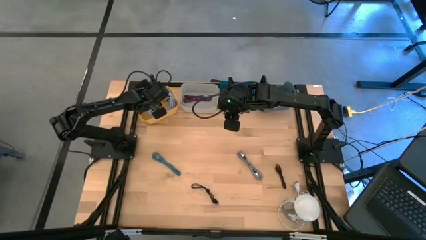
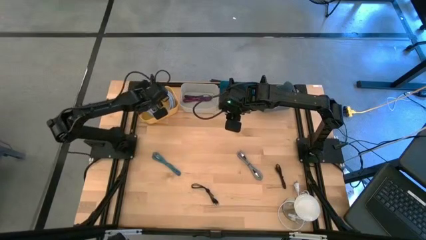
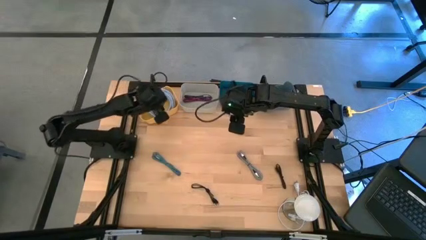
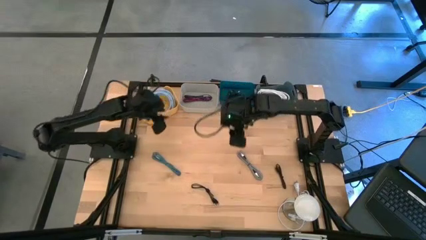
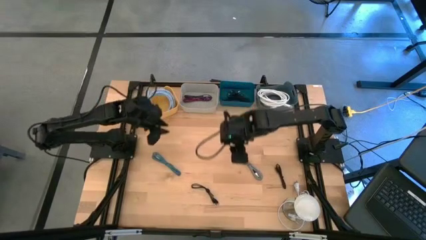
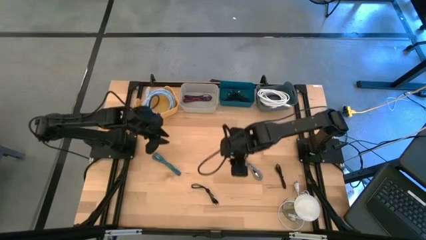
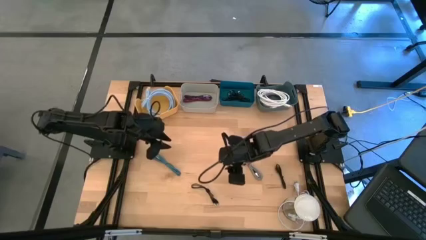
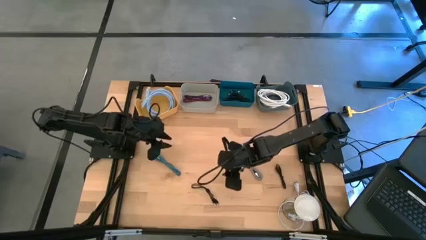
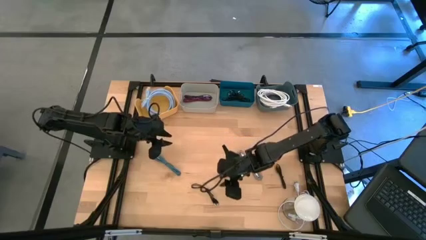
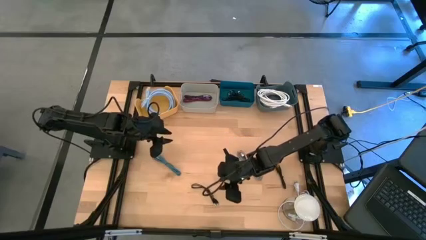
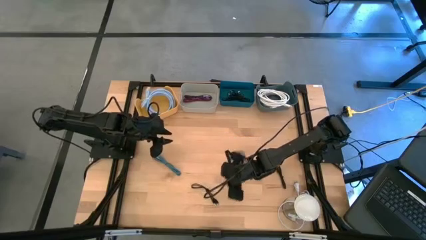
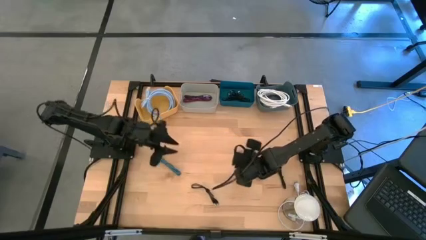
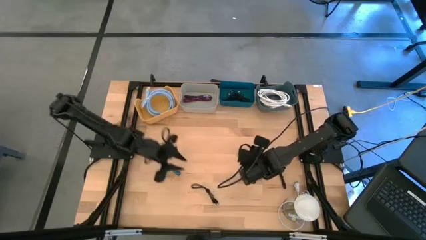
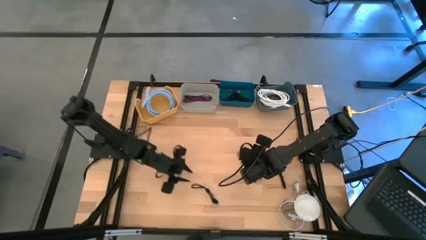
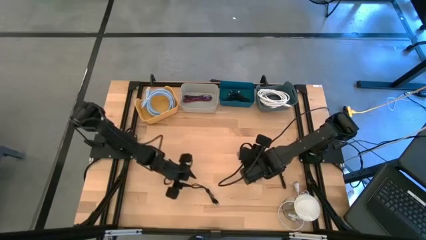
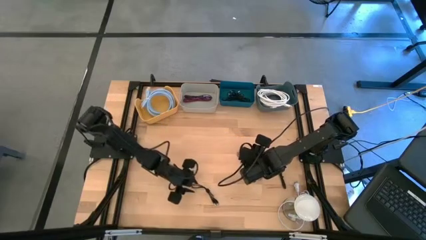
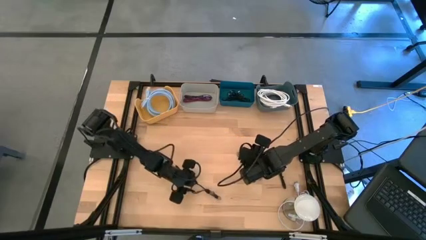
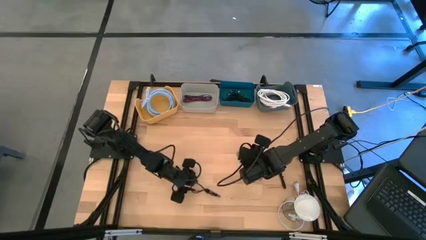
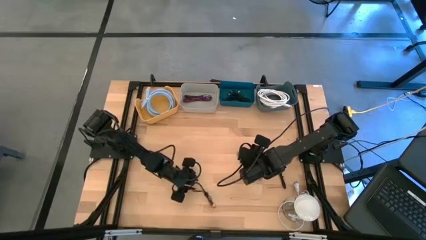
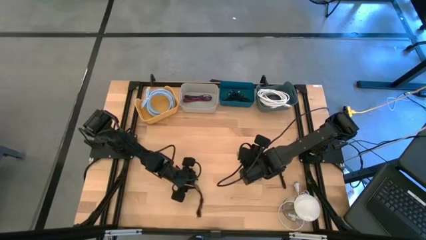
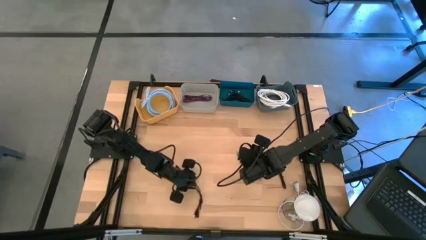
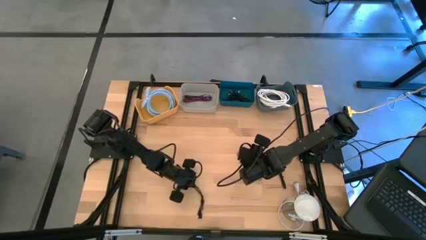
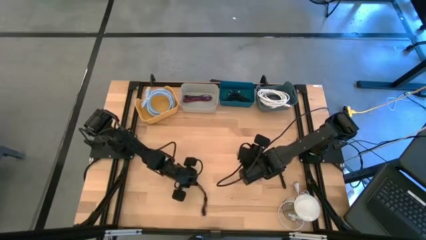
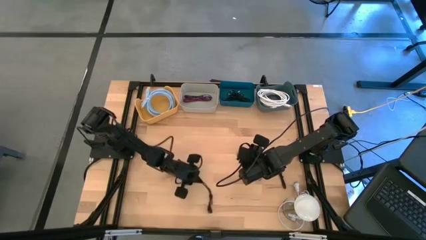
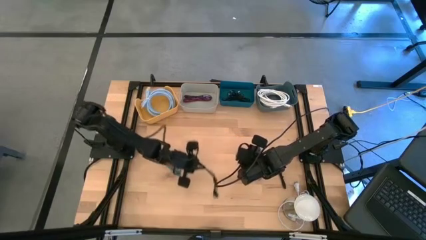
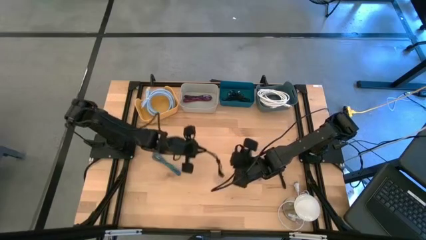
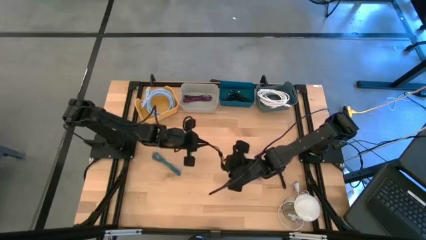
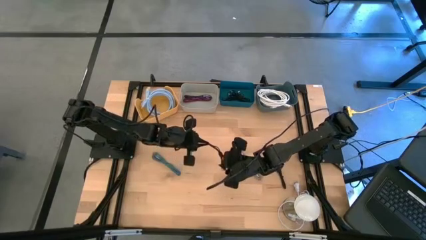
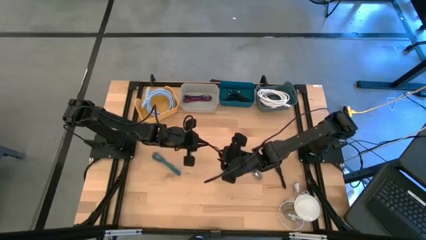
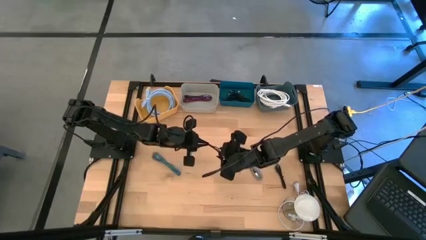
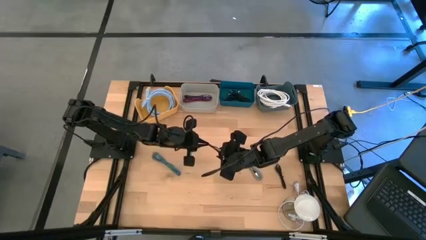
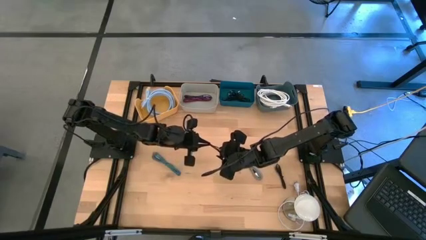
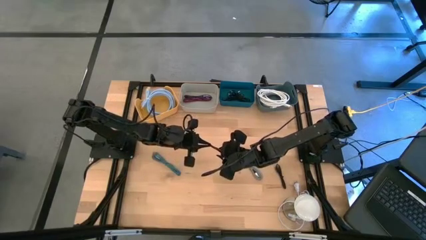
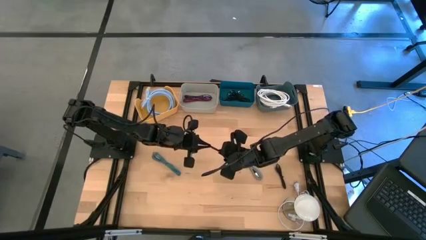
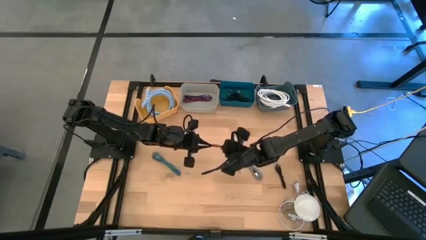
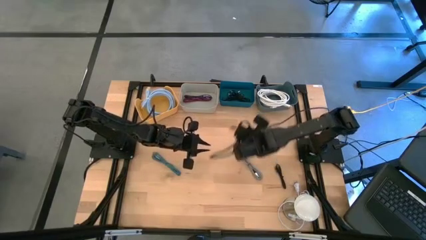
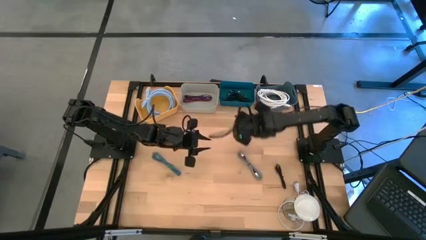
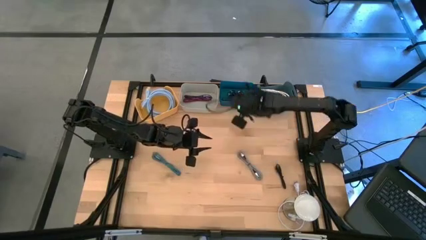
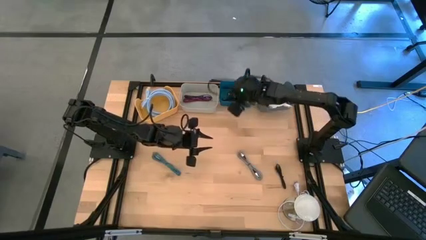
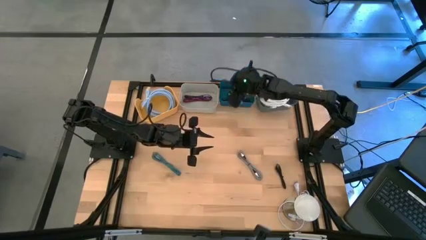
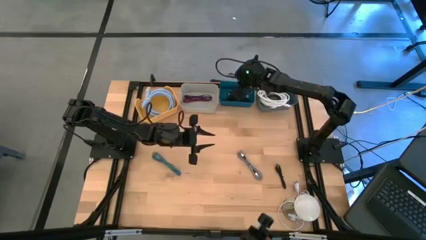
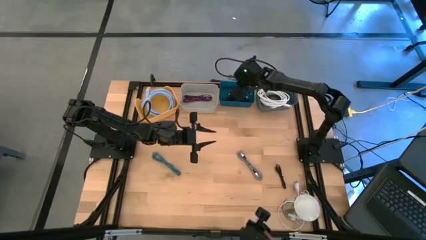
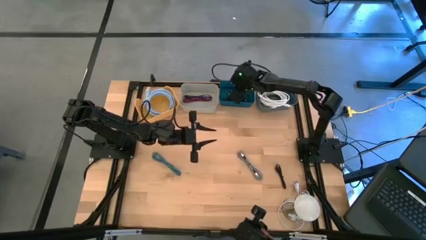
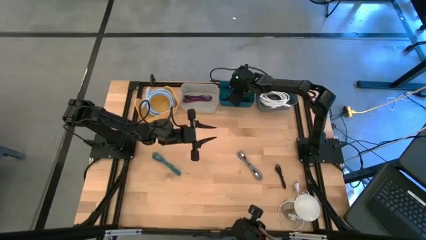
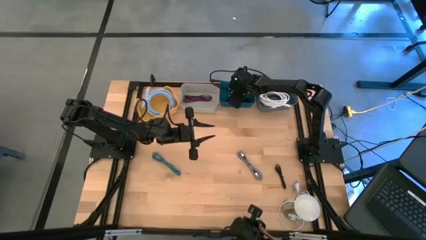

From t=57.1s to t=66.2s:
Task: Pick & Place USB Port
Put the black charger cable into the dark blue bin

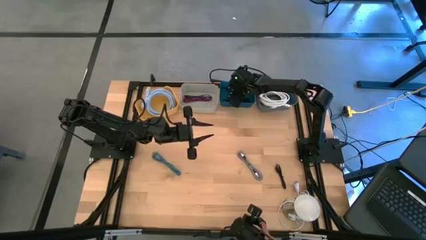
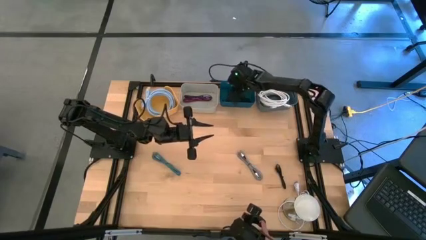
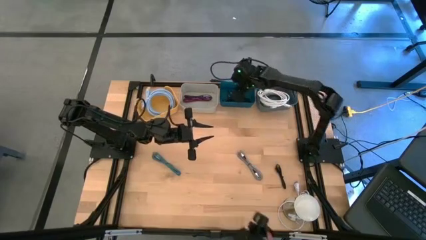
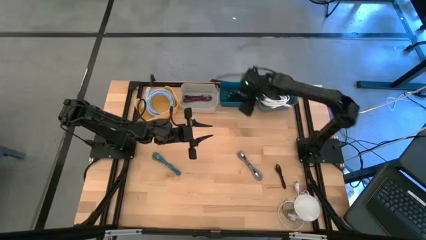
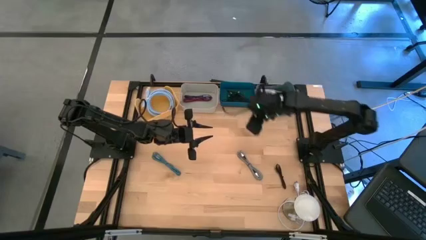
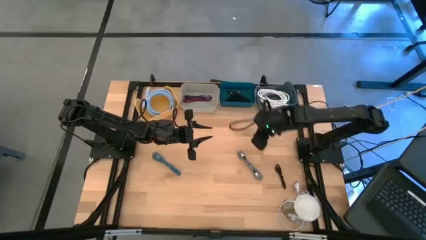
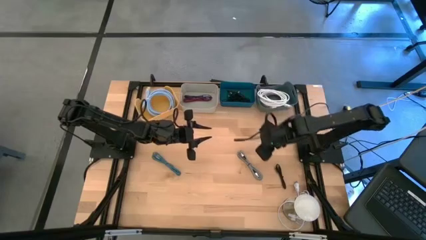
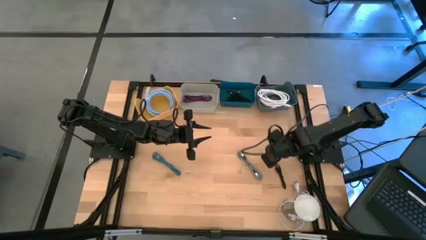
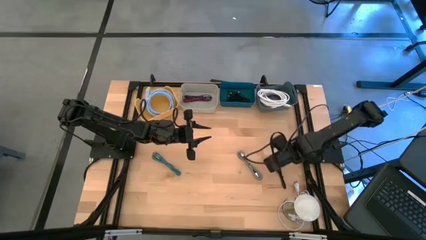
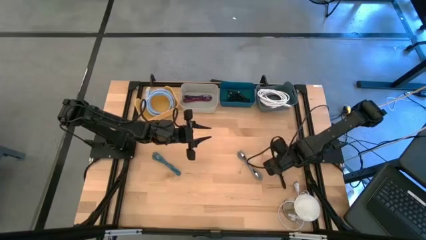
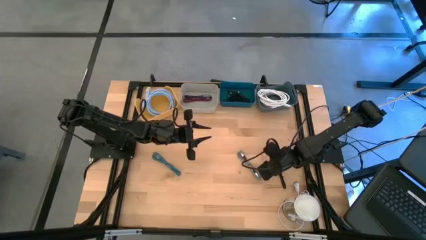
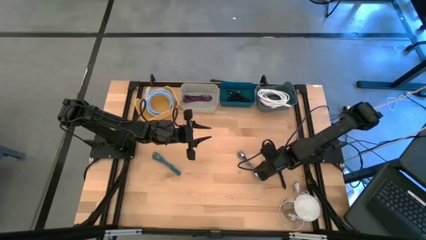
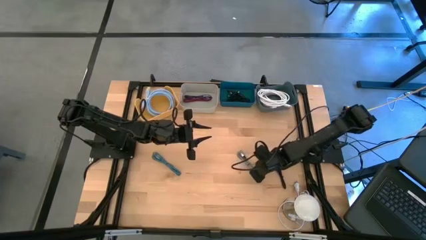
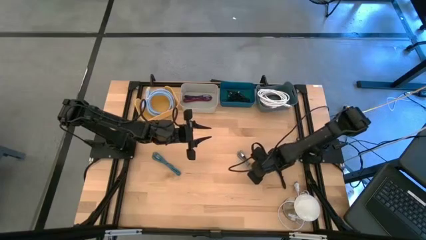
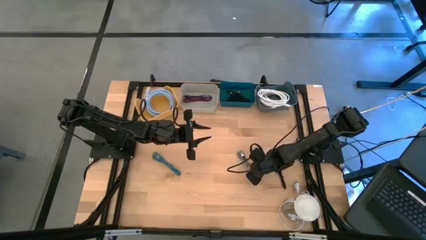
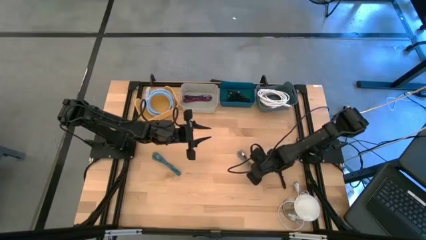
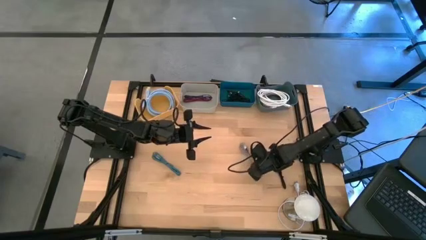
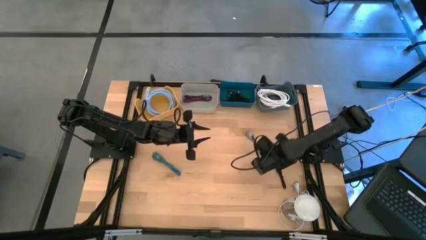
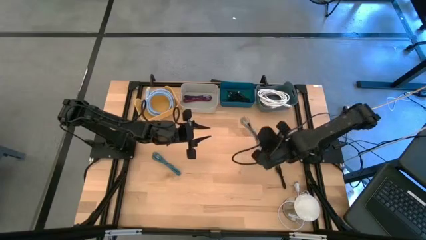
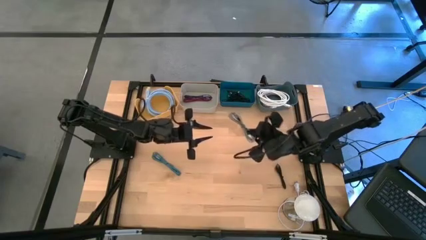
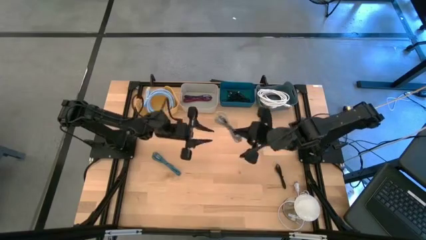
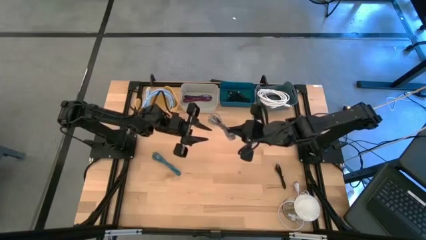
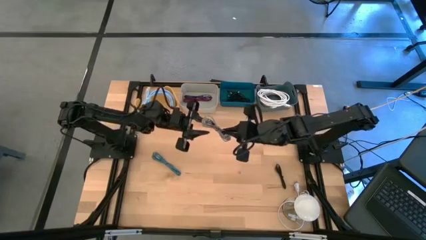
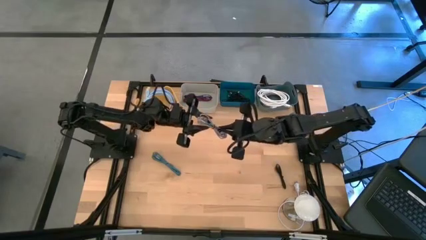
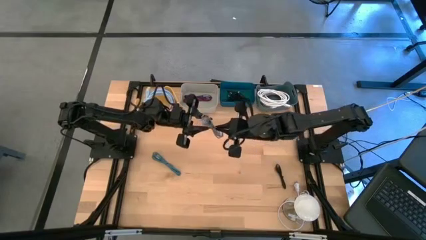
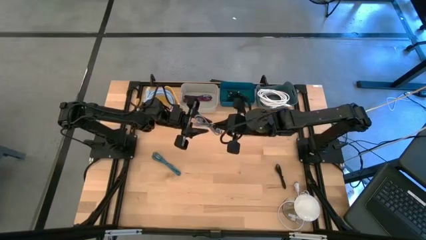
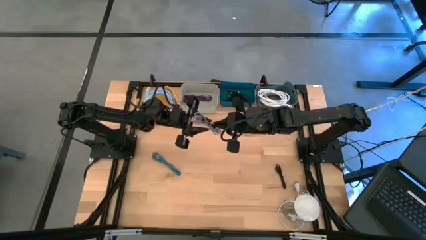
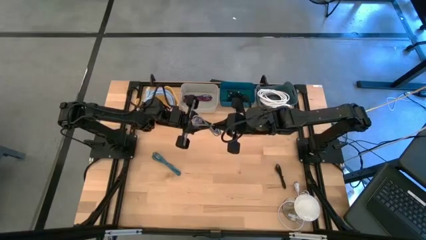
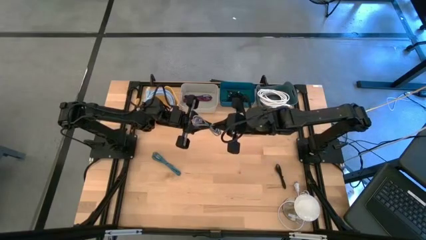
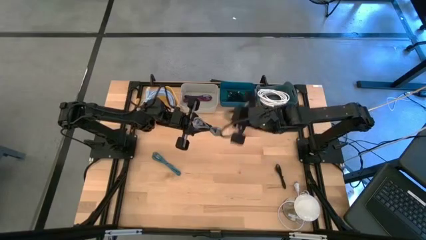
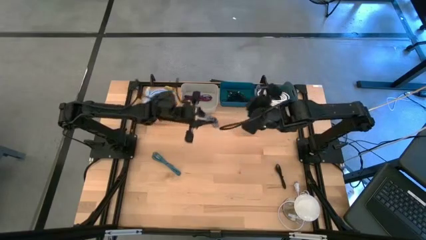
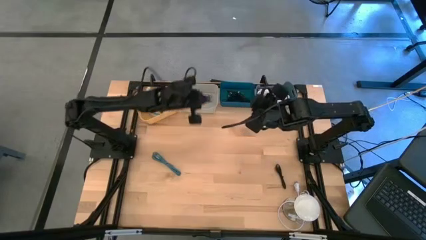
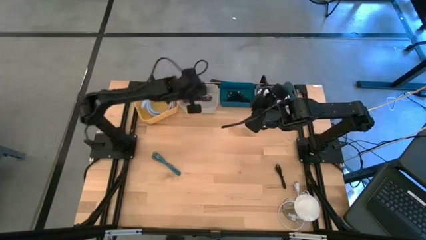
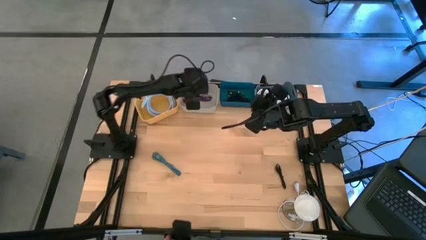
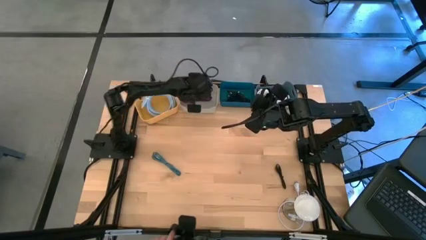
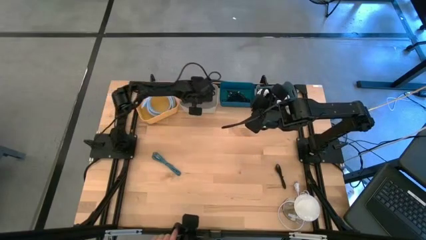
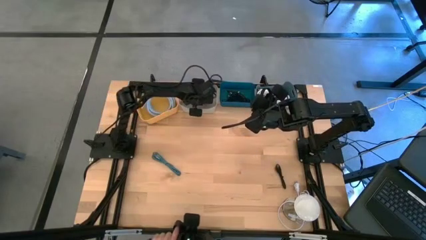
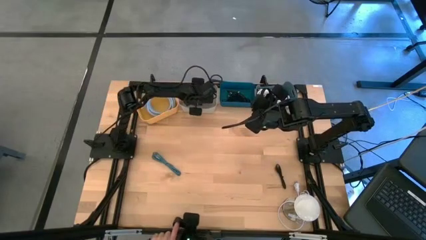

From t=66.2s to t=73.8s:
Put the white and black charger cable into the gray bin
